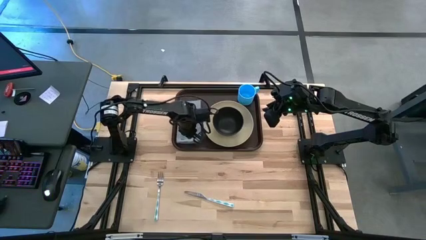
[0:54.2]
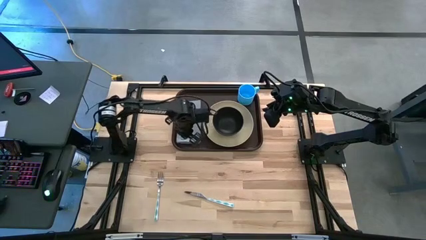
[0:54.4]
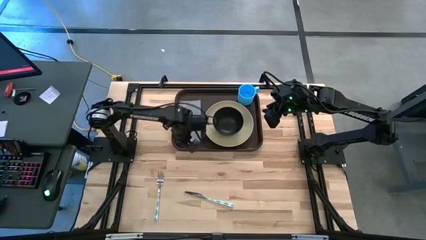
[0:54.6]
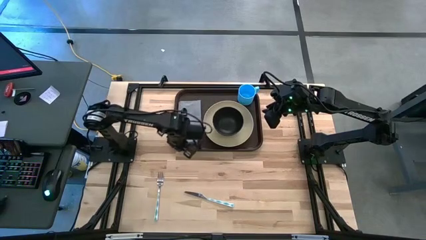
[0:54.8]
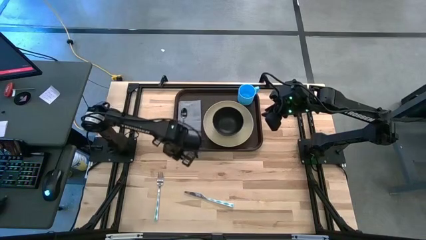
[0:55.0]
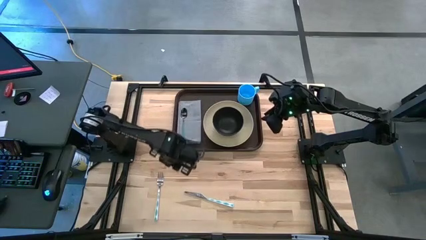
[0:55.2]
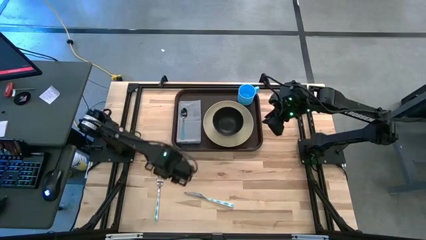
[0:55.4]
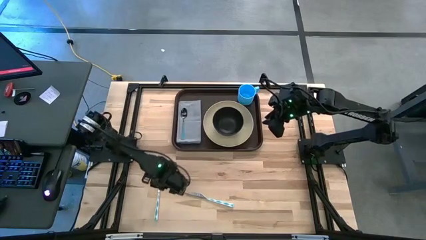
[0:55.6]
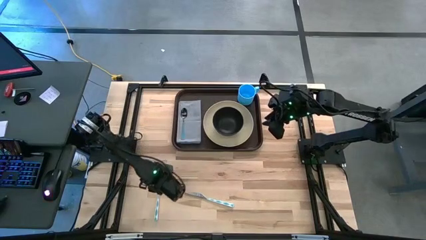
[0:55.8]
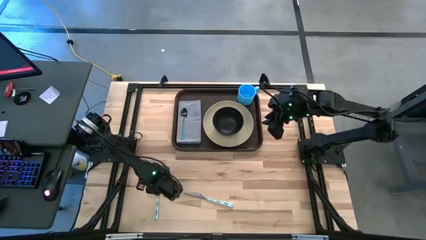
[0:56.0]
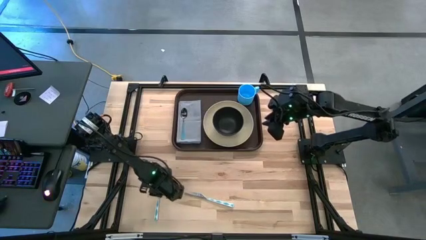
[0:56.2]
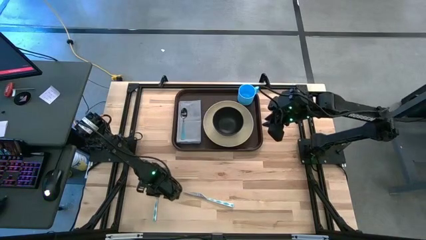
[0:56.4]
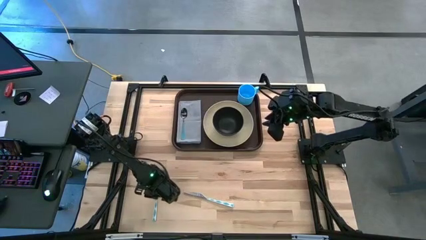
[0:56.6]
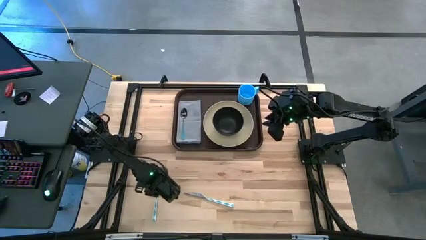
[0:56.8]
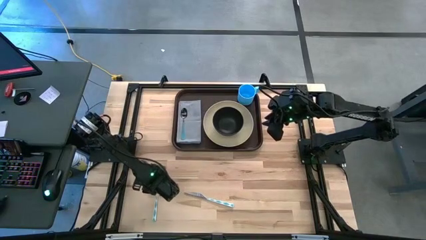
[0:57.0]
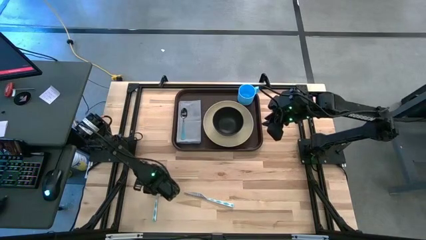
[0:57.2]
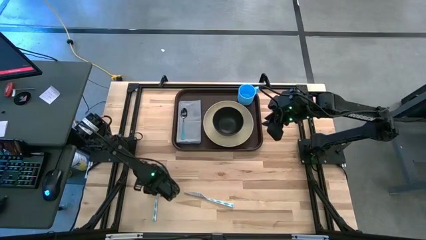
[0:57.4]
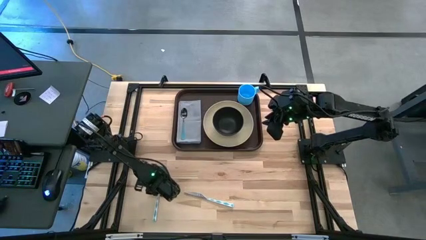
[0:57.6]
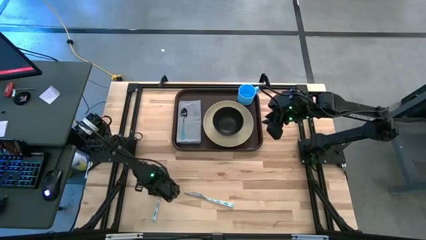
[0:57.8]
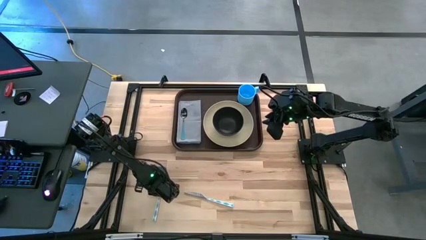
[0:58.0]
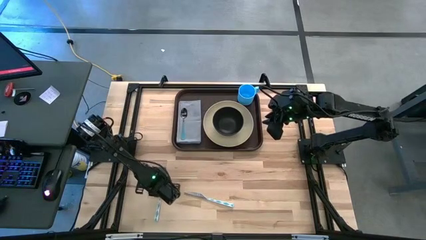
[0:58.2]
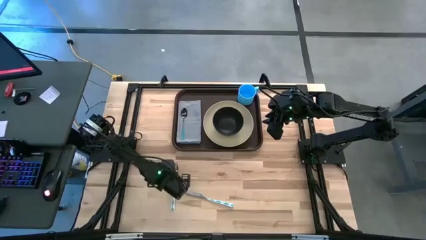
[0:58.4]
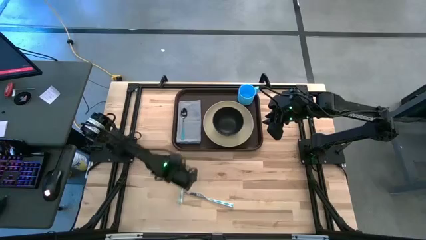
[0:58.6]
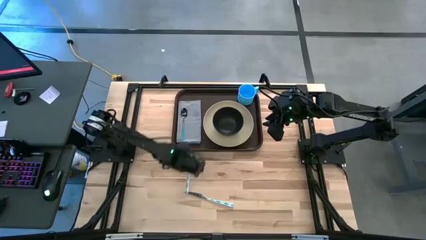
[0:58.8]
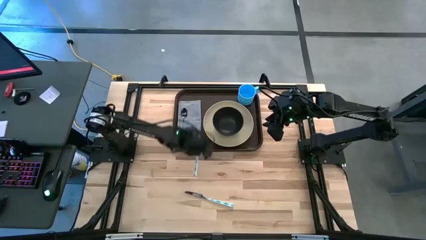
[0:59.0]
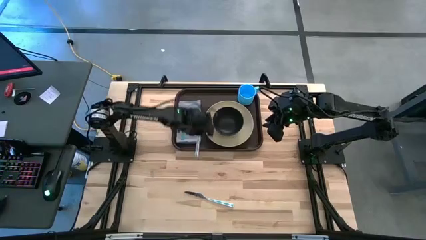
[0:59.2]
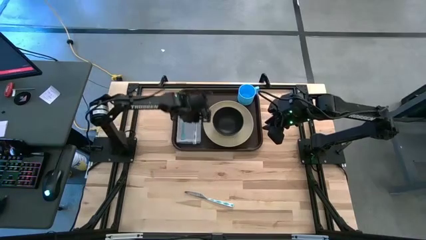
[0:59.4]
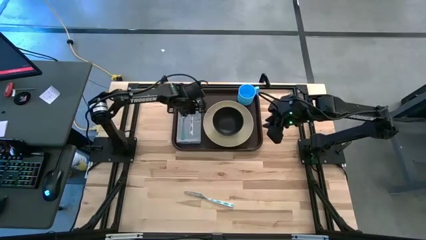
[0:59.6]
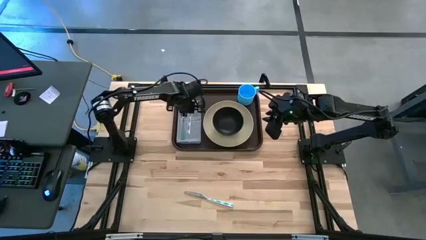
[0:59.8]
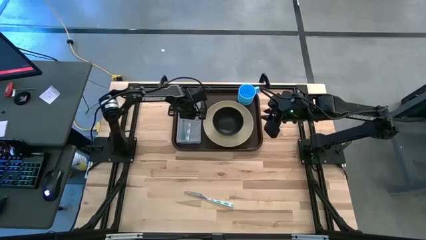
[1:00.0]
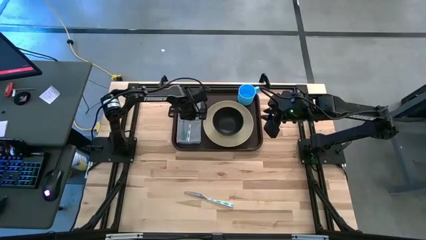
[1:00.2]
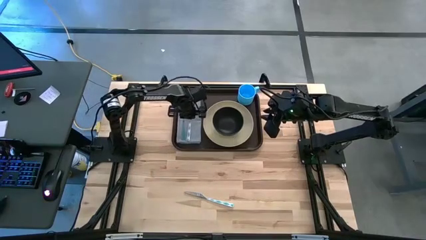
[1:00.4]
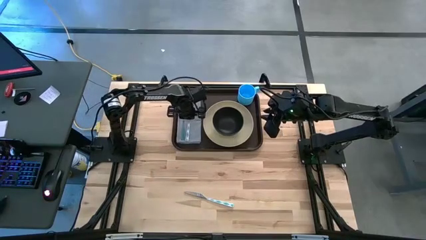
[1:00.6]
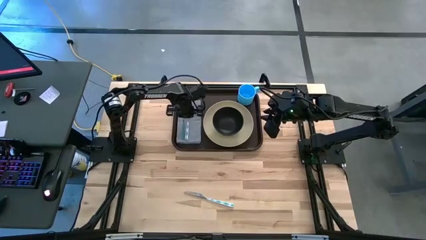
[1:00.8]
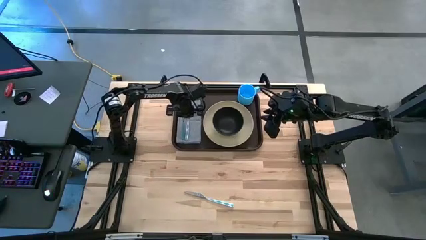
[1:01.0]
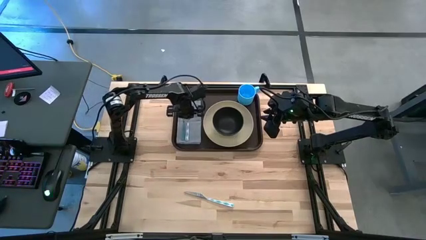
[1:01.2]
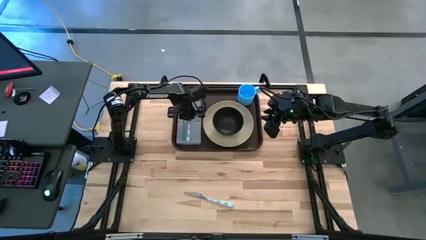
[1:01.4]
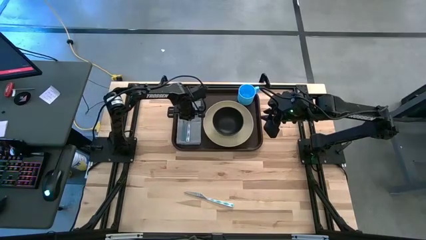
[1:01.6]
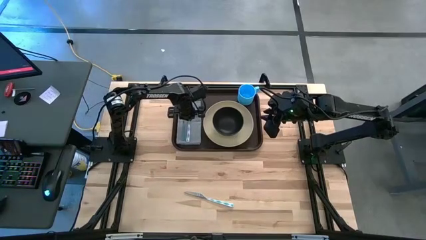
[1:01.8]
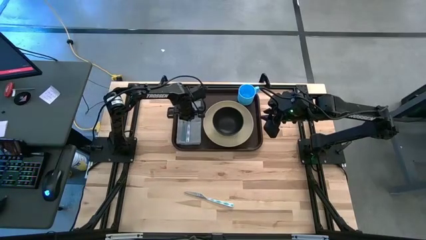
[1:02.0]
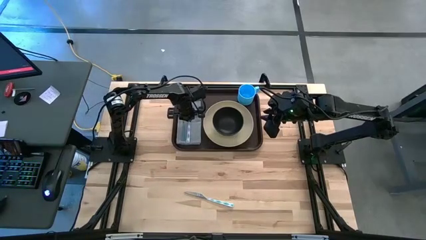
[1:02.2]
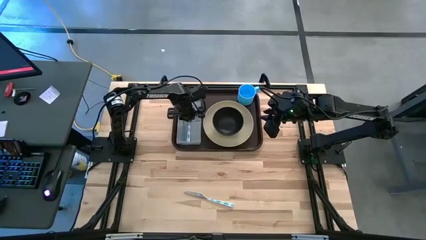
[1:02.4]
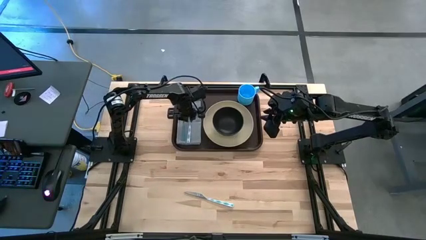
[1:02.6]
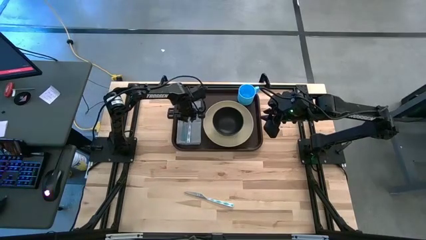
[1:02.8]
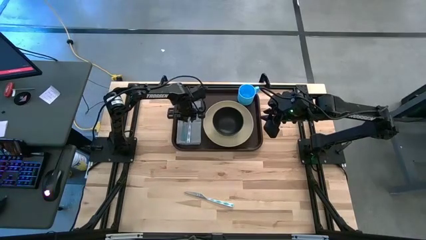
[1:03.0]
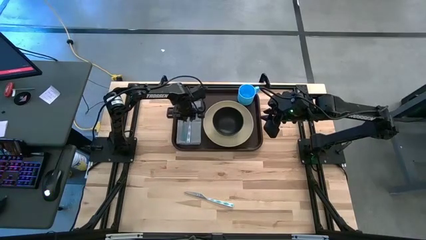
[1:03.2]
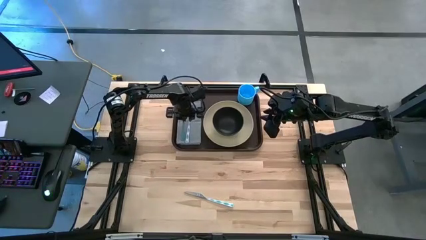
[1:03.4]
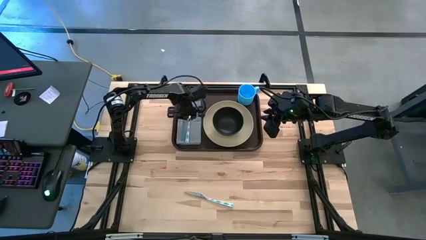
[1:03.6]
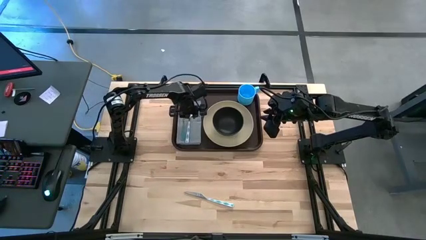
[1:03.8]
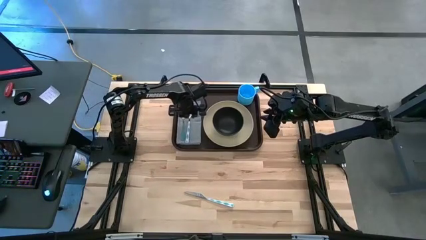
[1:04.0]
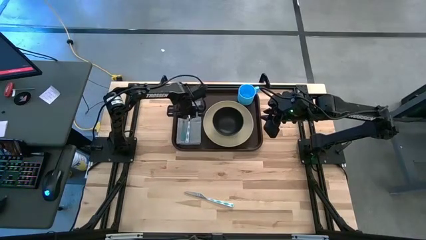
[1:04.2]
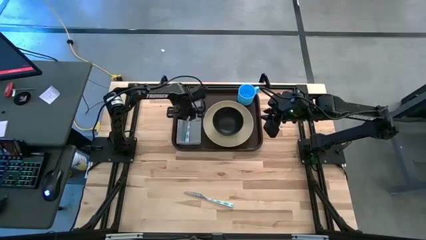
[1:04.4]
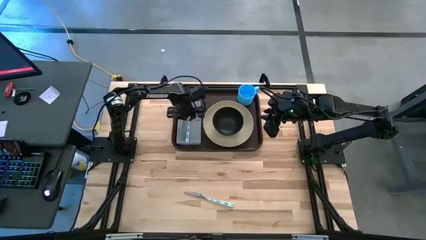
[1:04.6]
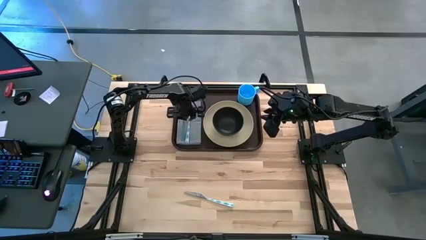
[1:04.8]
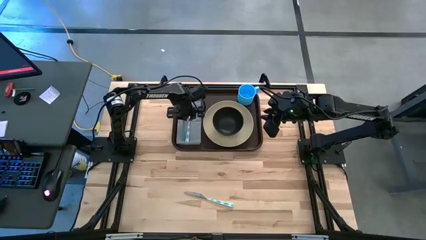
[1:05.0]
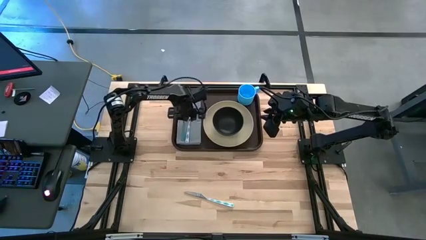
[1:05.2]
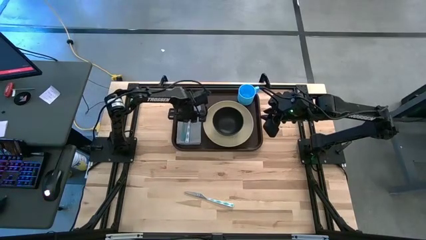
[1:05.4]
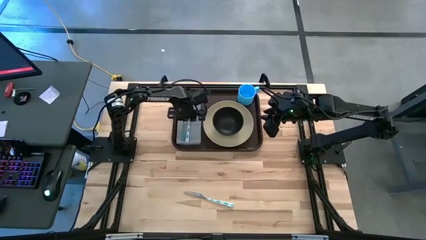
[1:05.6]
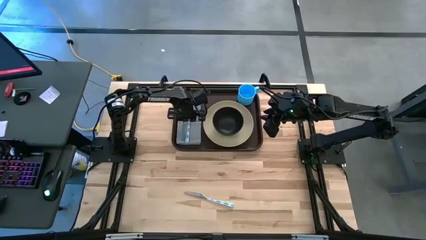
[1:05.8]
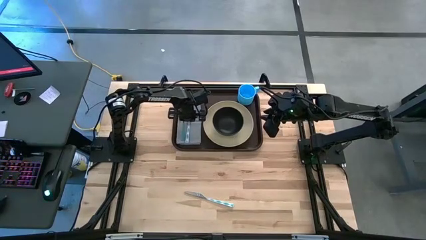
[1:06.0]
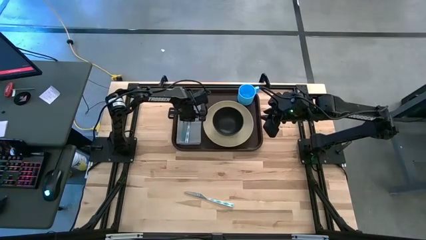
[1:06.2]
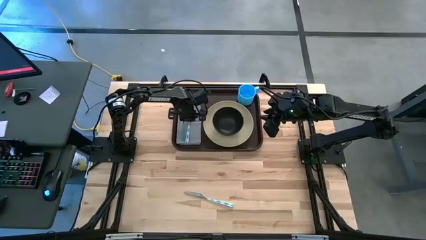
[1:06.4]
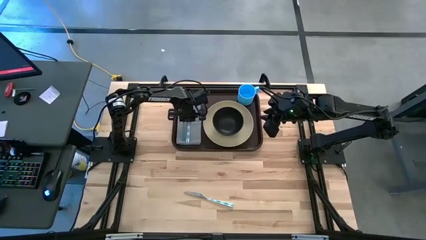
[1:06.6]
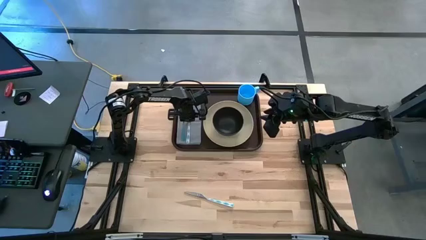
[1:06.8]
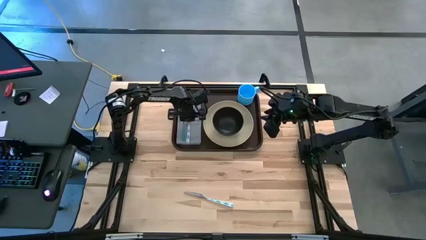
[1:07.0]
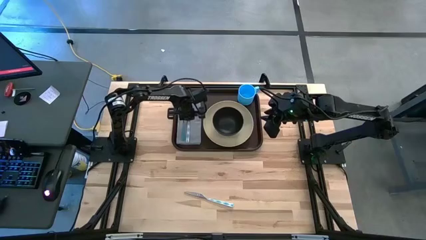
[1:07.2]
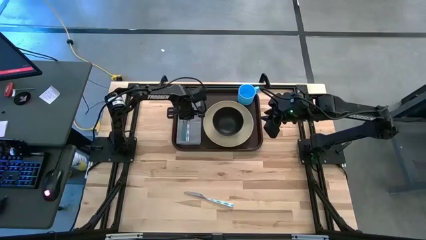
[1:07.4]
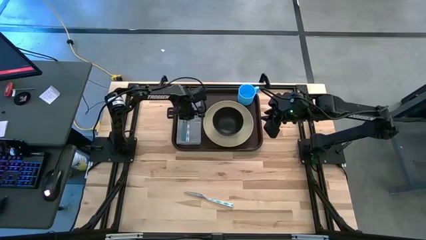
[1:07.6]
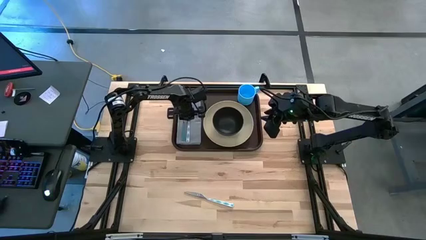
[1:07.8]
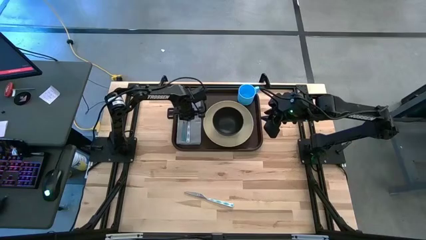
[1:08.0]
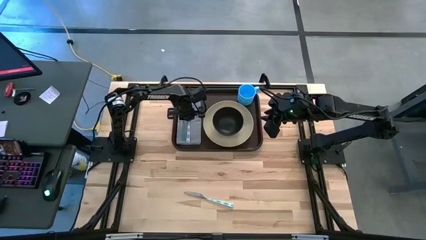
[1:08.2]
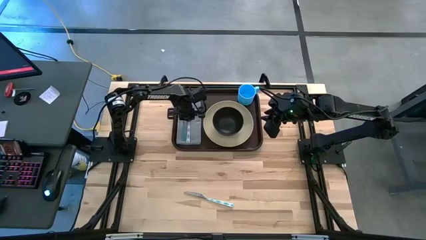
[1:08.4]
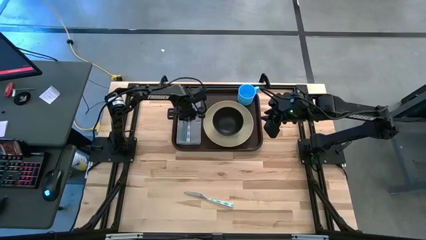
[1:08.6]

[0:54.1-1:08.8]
Task: Set up tray
Put the blue fork on the gray napkin to the right of the blue spoon

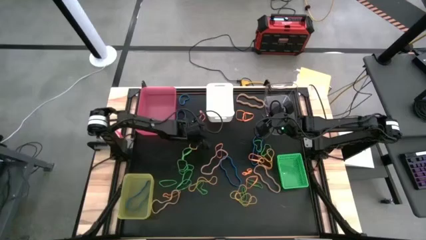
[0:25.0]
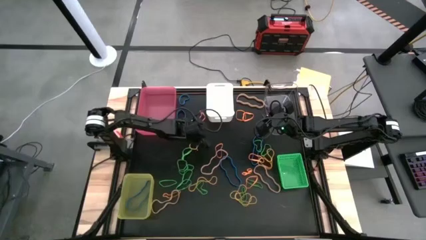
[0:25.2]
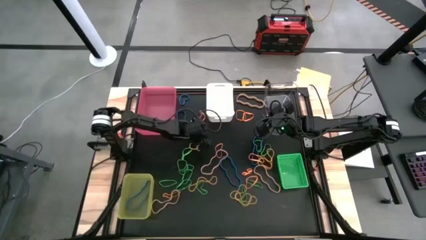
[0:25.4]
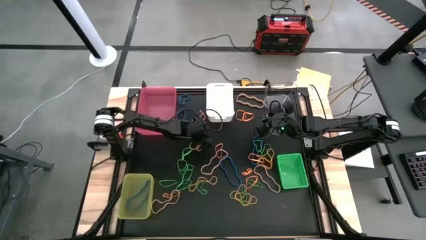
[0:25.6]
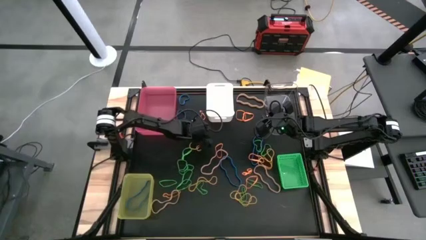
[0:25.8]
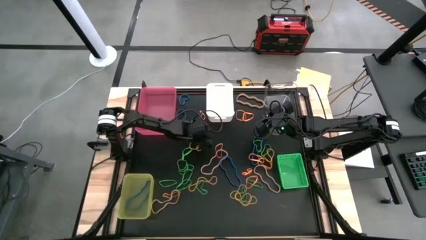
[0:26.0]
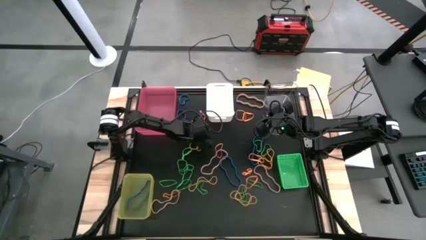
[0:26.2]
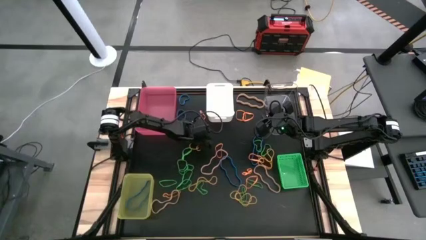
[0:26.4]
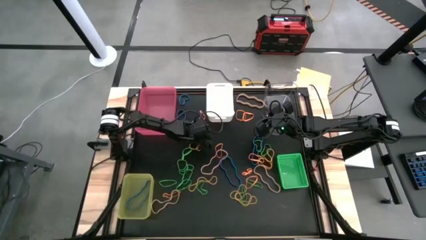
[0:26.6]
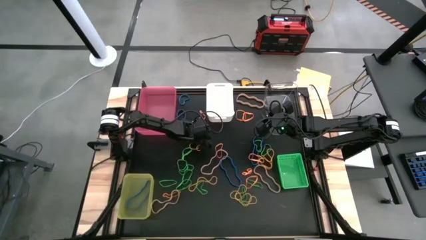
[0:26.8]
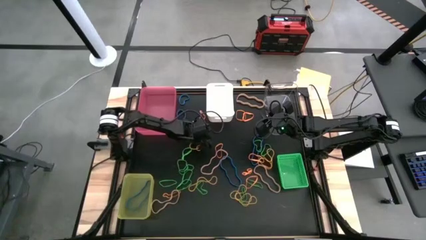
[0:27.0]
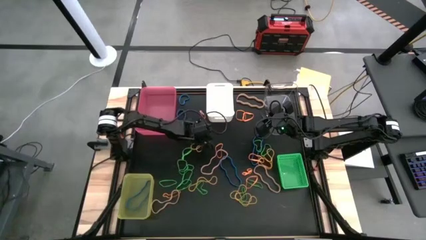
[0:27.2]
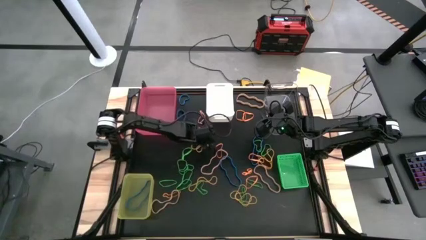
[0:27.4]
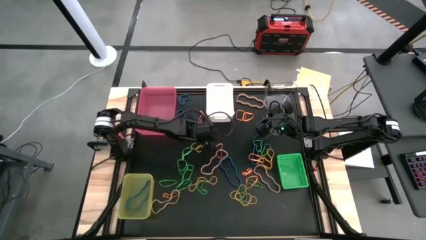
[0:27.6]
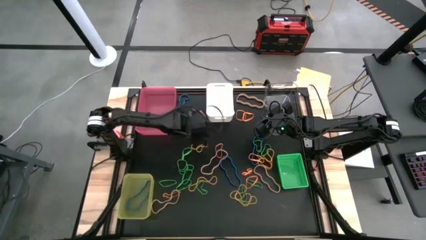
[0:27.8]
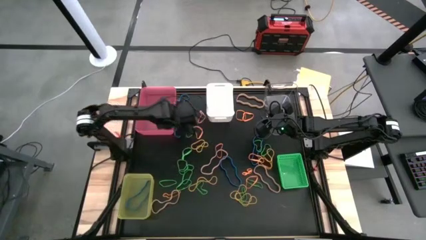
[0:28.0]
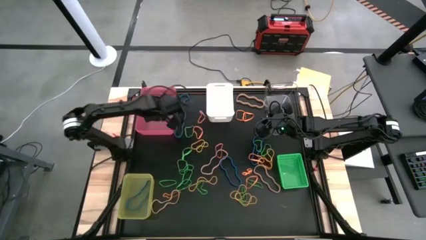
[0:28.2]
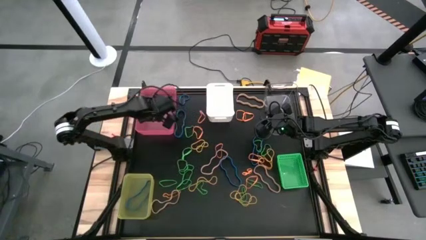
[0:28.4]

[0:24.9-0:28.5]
Task: Sort rubber bands into baskets
Put the orange rubber band into the pink bin
